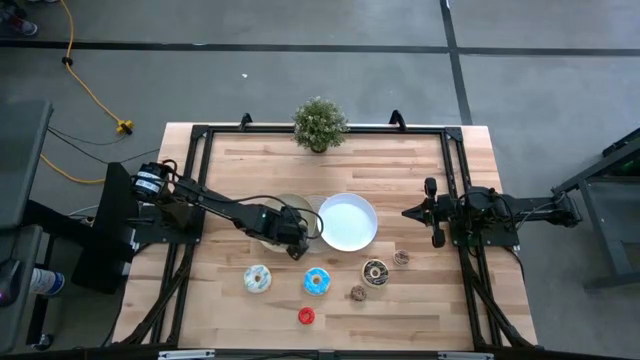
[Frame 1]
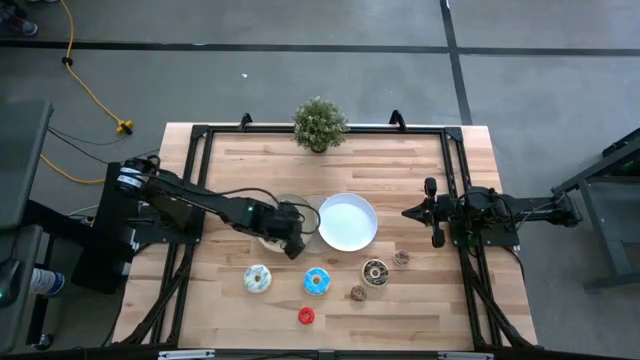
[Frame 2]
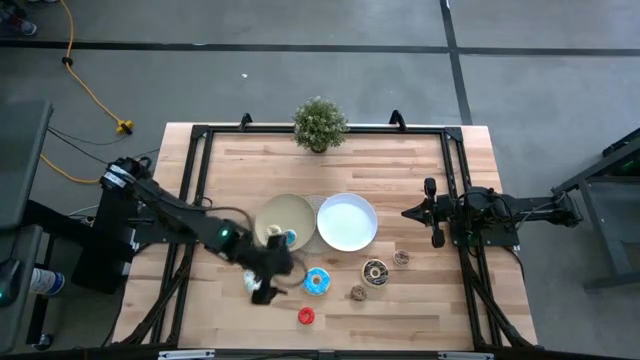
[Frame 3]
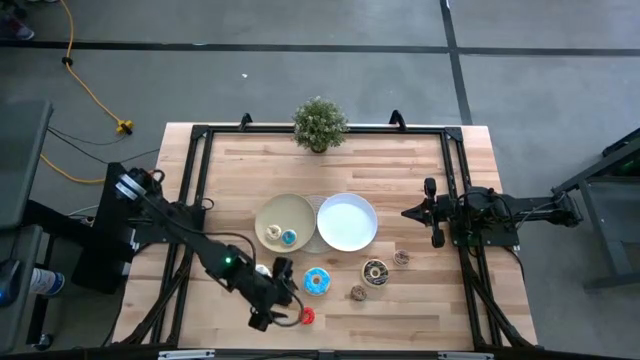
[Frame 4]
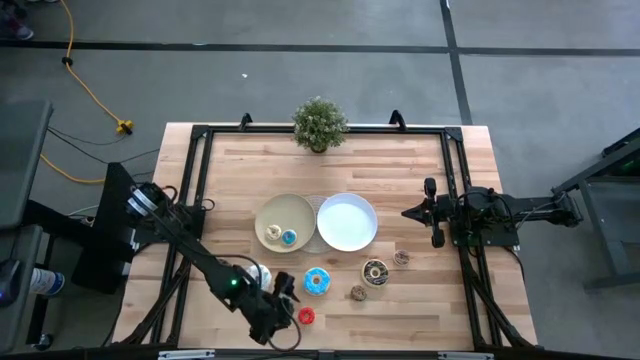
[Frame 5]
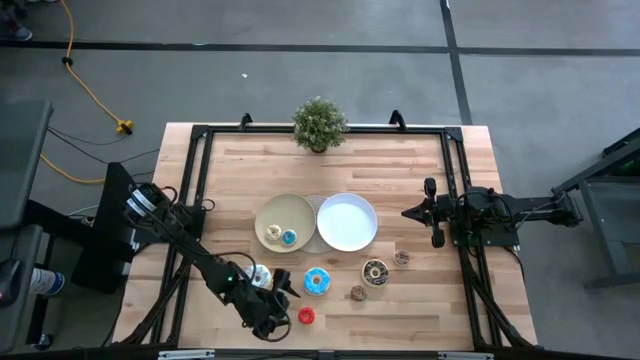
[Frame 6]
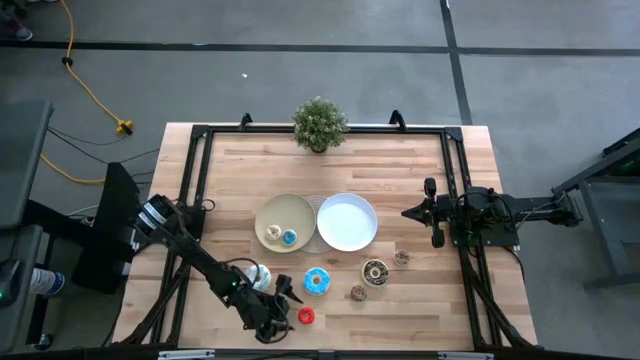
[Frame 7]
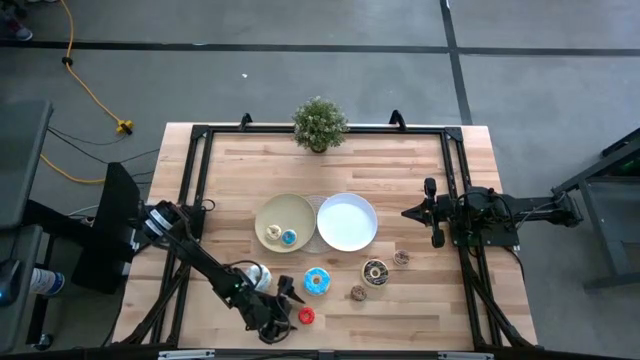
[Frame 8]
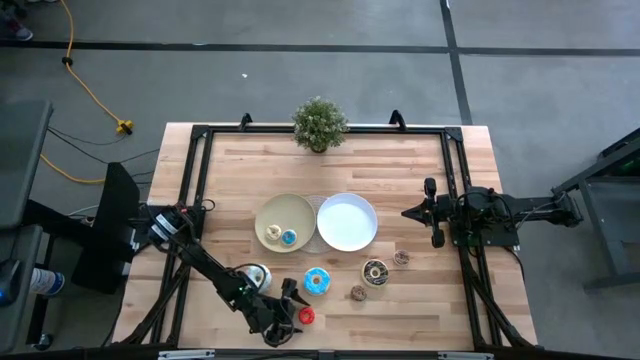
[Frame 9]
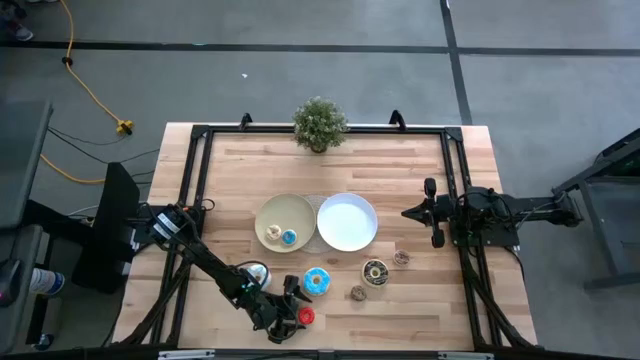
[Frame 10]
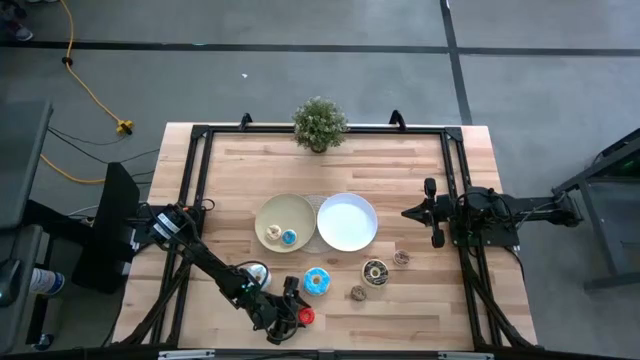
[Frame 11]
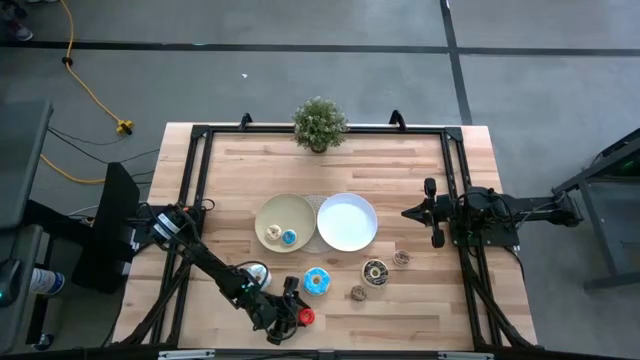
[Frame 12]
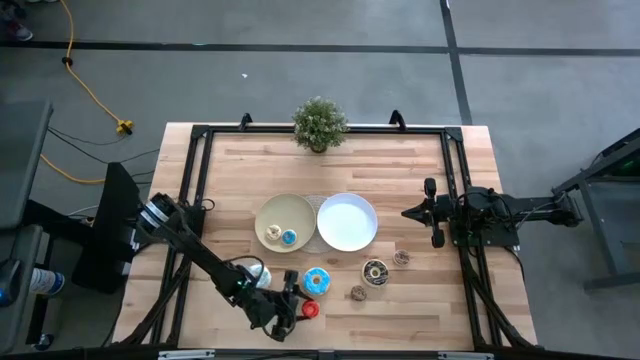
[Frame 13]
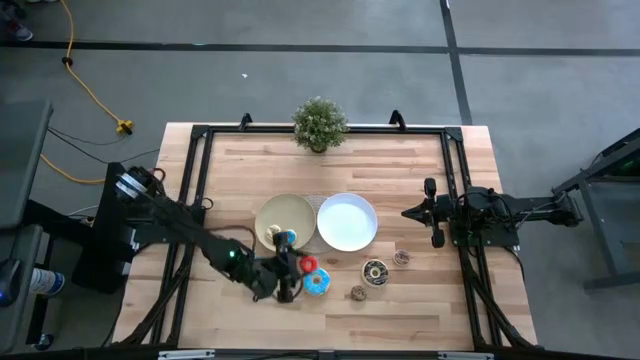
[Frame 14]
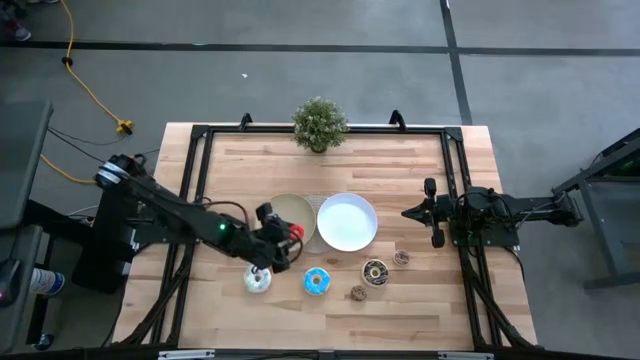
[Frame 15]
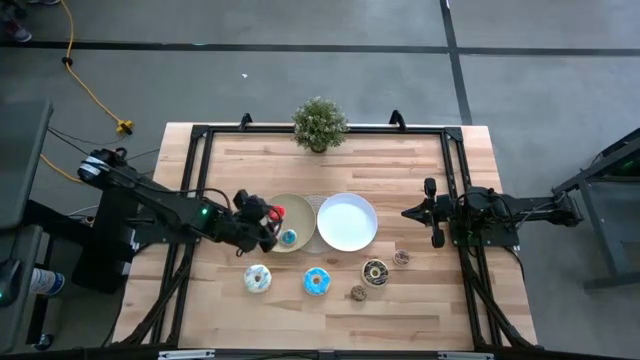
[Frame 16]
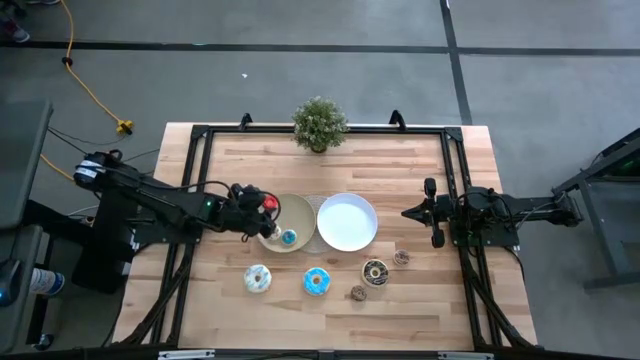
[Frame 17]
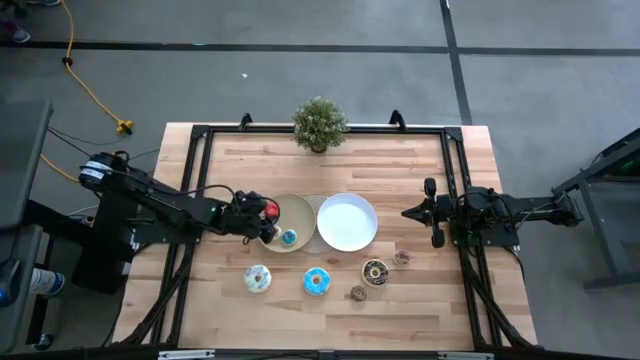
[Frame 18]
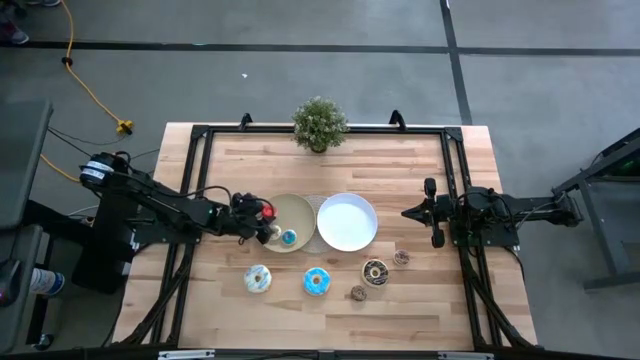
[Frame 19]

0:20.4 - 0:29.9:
Task: Pick & Place donuts
Put the small red donut on the brown plate

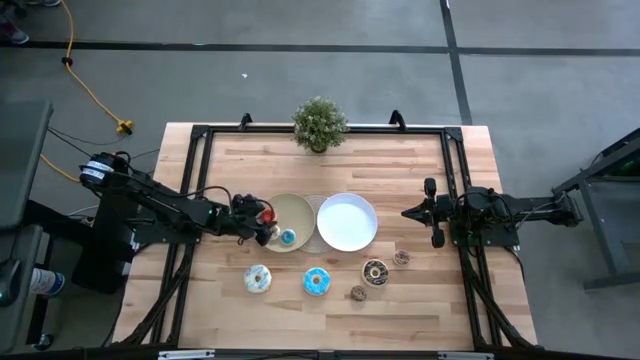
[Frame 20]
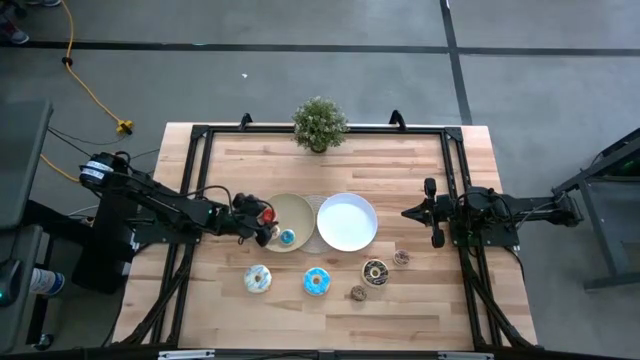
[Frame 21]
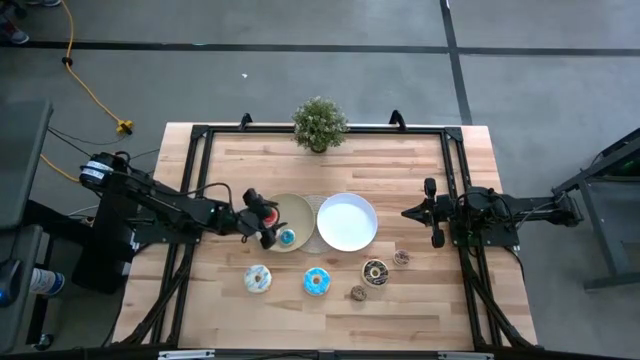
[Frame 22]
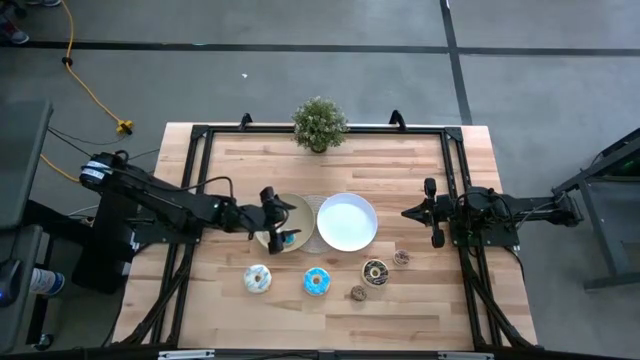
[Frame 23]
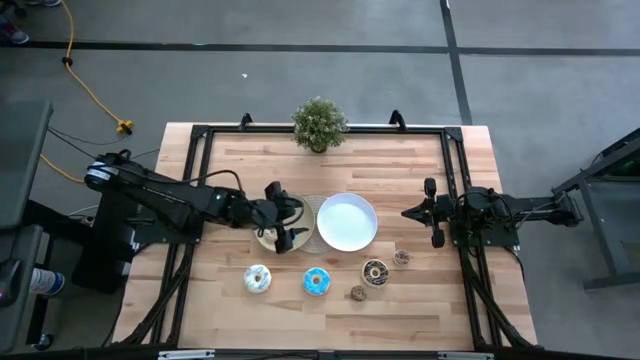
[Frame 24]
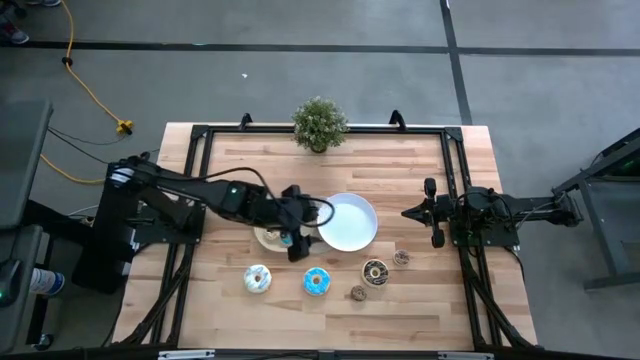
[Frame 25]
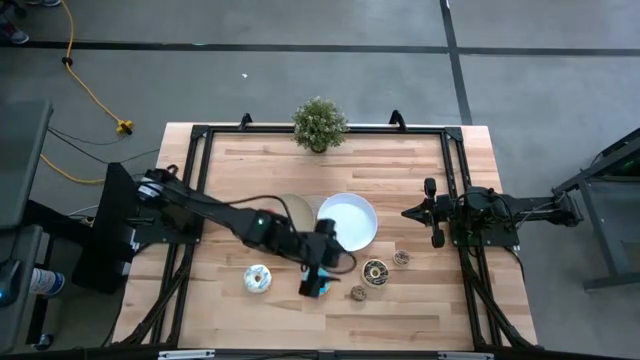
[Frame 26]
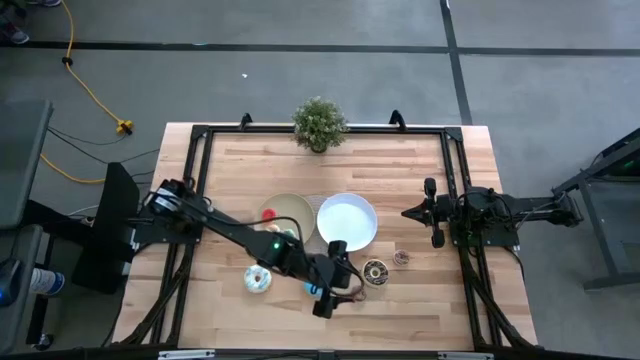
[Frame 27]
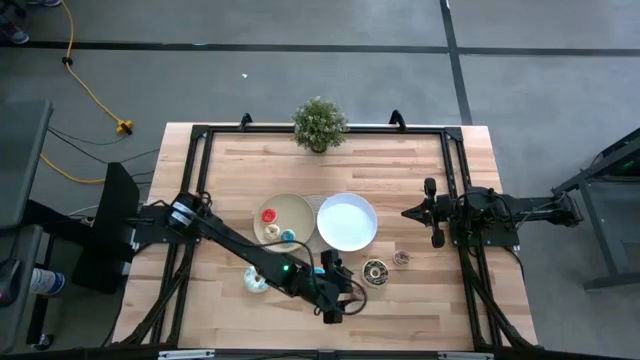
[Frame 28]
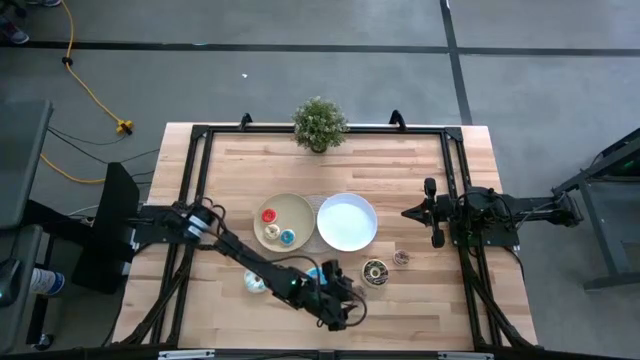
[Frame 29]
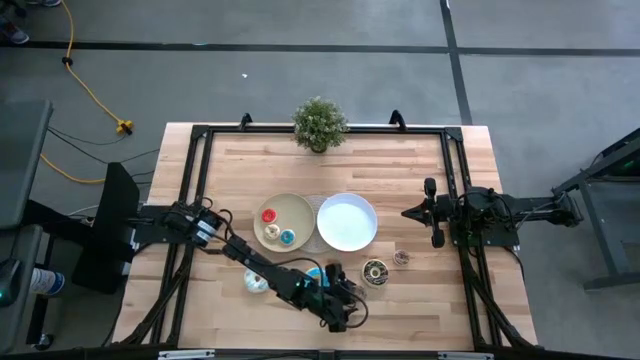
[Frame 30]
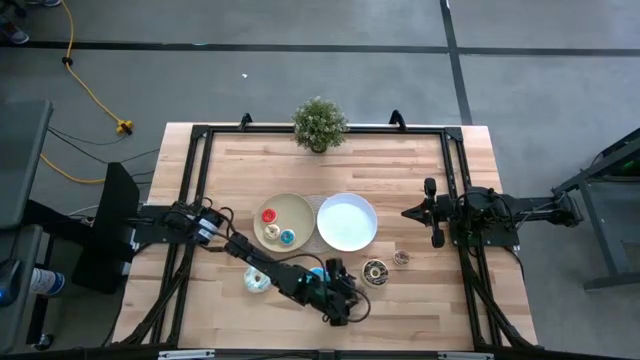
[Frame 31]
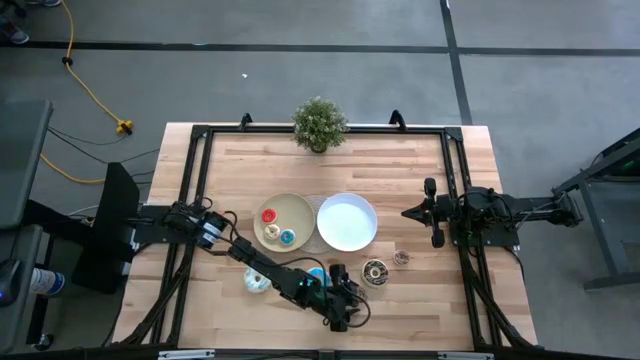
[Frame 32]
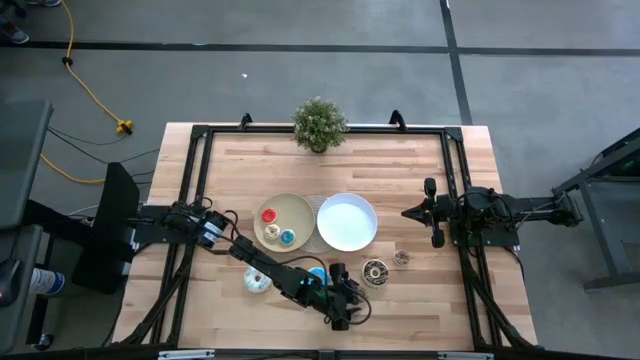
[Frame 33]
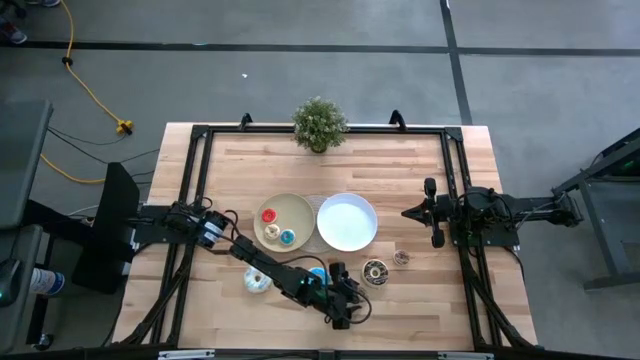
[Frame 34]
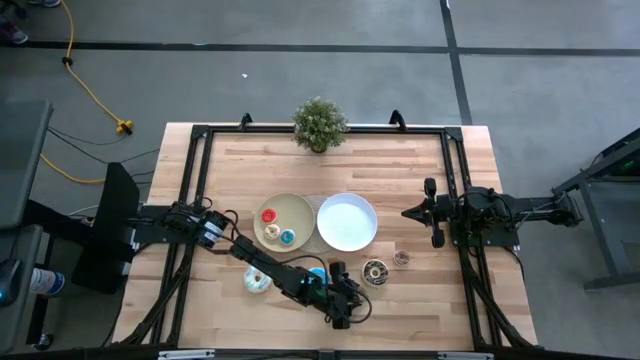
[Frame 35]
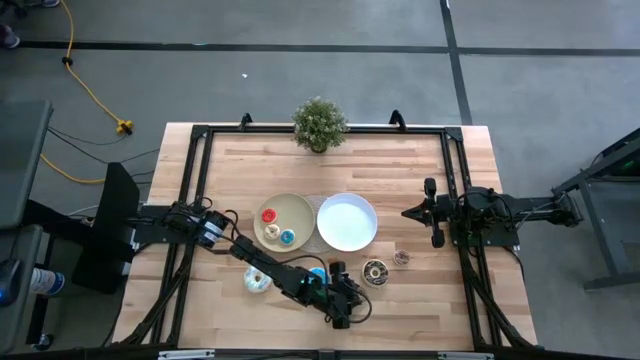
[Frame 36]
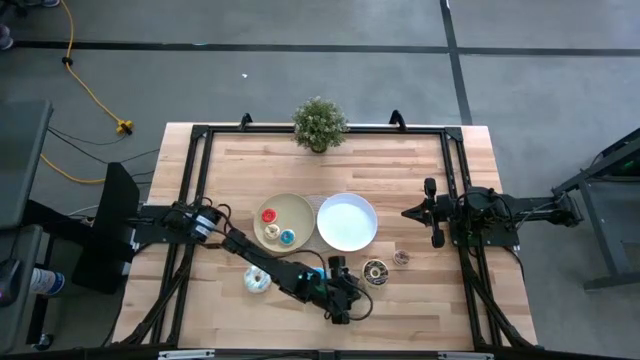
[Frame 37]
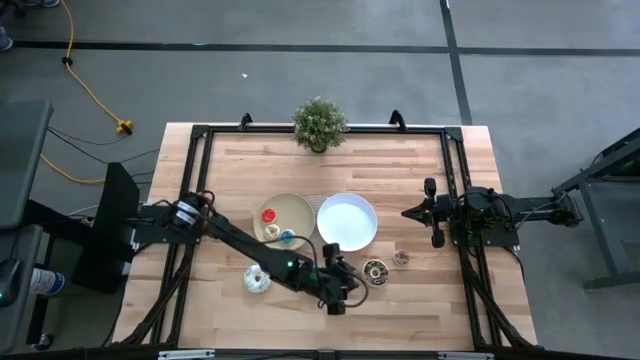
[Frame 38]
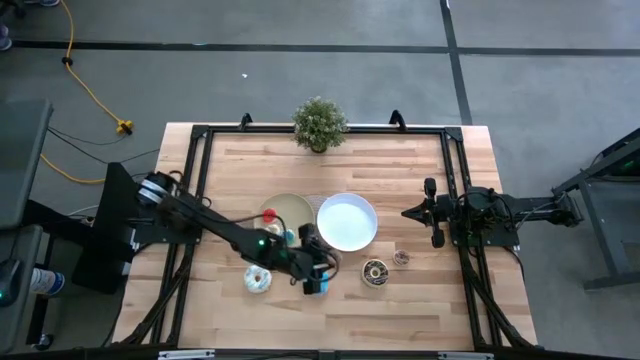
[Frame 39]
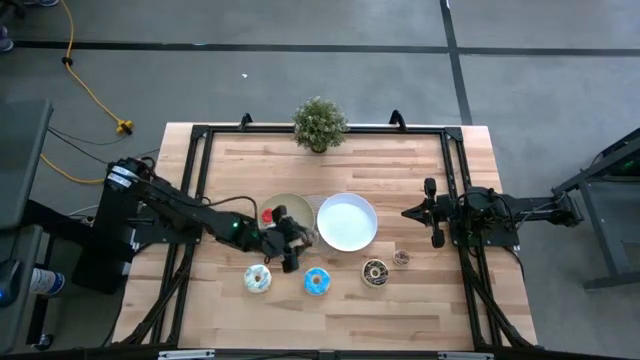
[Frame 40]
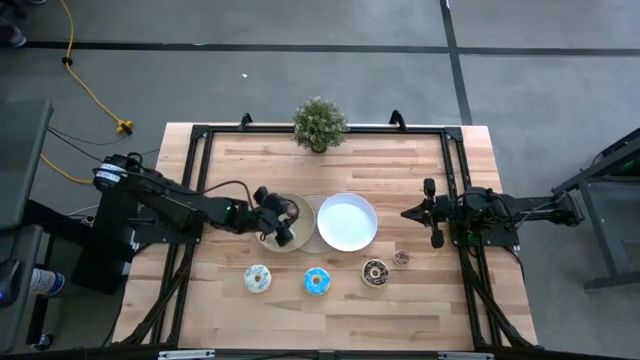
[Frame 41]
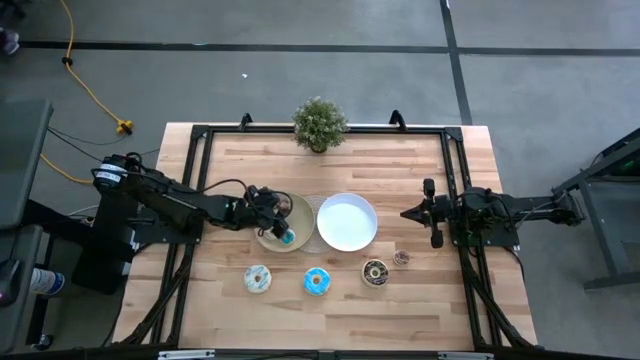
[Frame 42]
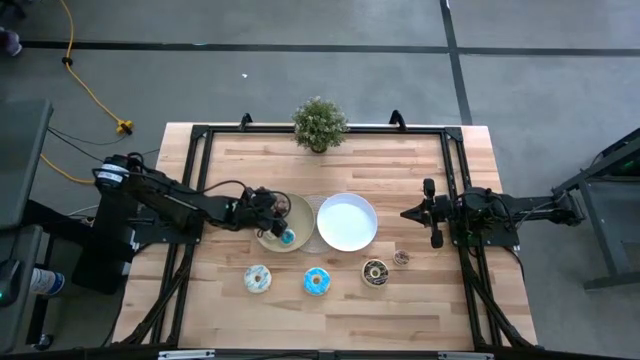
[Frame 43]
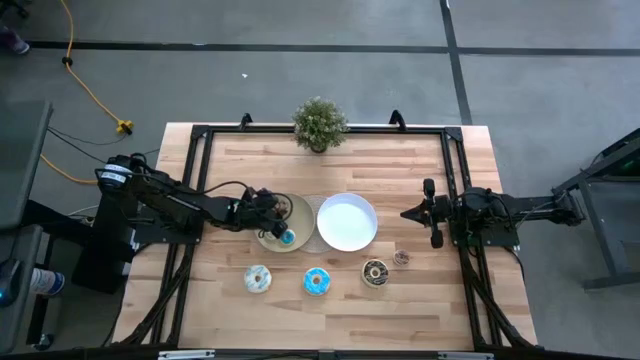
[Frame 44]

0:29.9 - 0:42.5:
Put the bottom small brown donut on the brown plate
